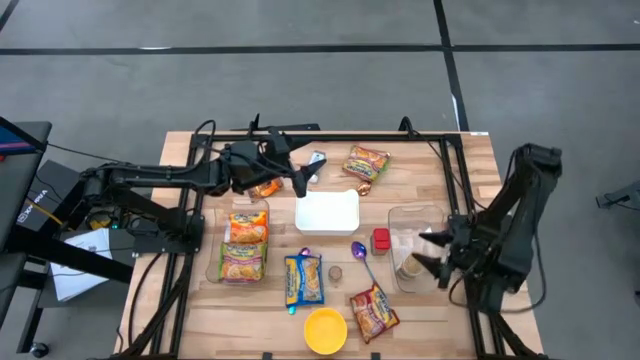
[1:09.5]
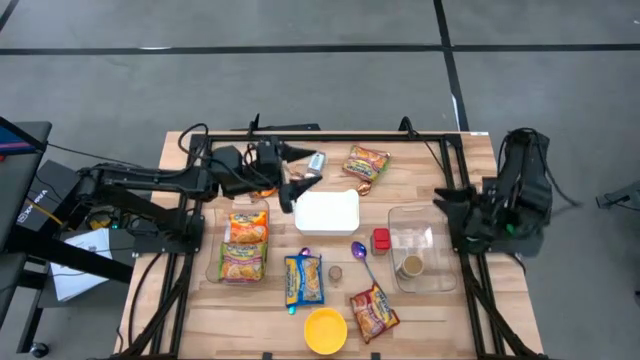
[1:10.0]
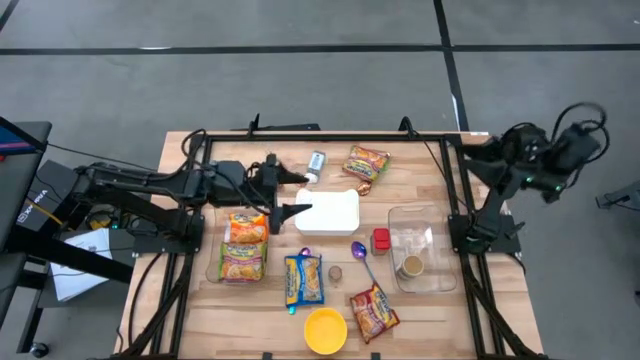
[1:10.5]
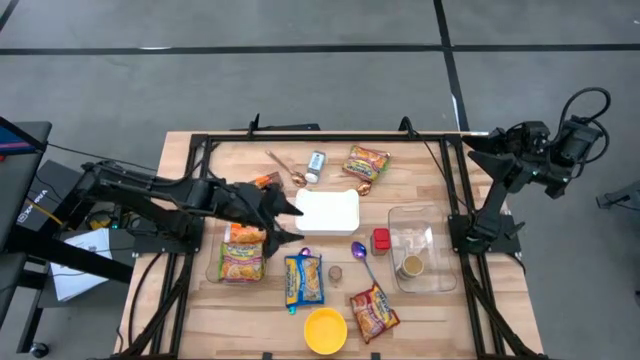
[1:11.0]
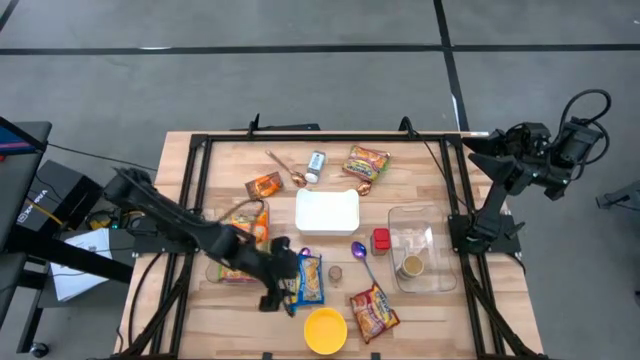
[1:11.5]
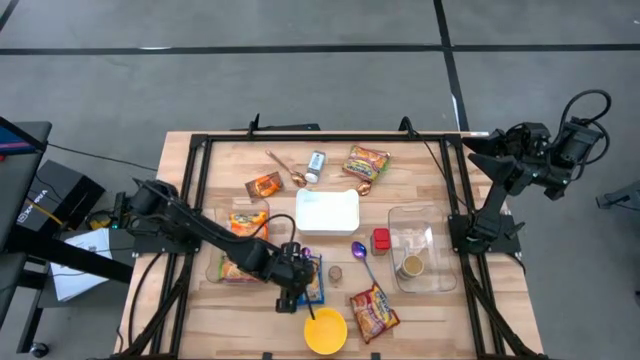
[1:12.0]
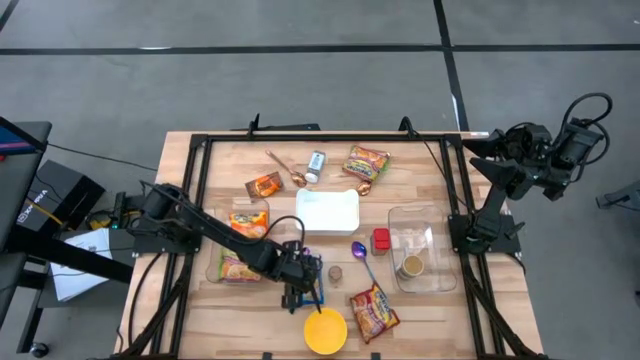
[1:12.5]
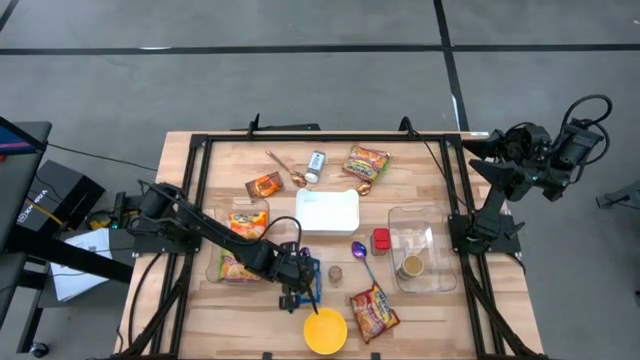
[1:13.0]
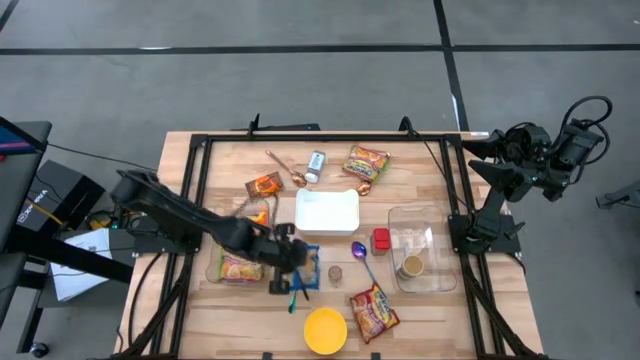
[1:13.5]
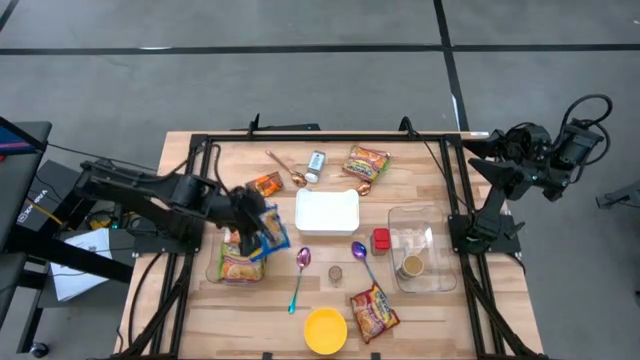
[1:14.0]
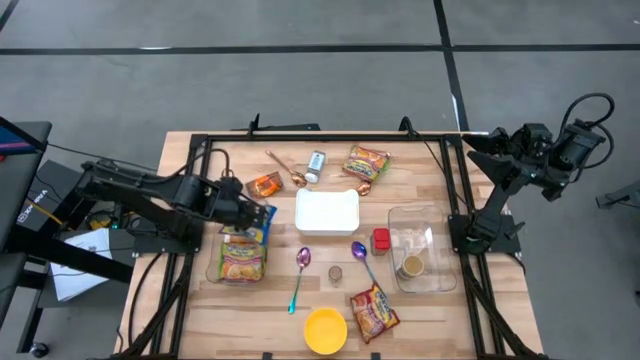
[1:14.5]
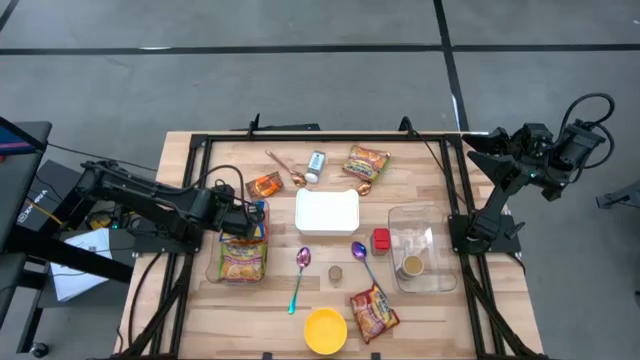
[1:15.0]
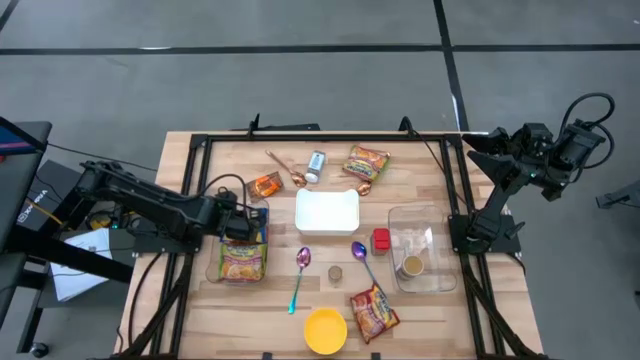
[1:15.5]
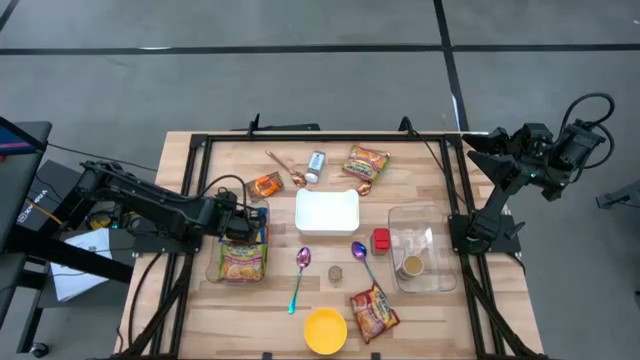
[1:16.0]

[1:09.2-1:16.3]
Task: Pick & Place Food Item
Put the blue noodle pack into the left transparent bin

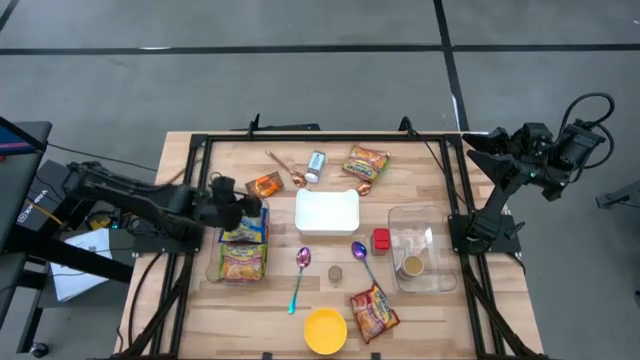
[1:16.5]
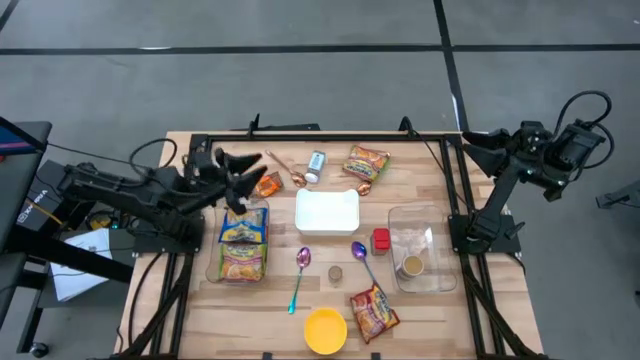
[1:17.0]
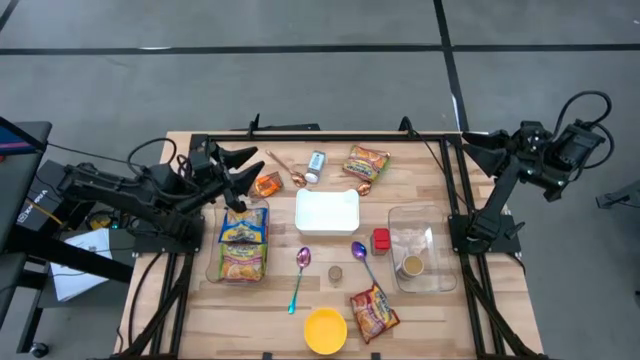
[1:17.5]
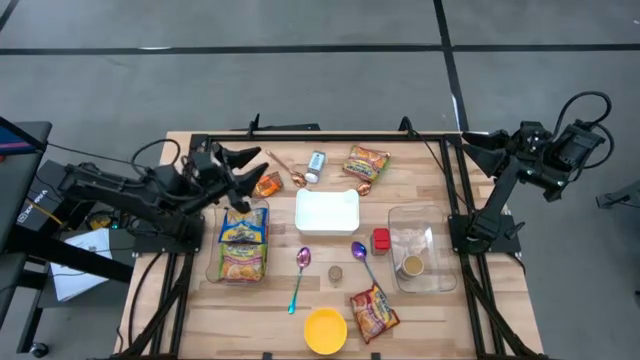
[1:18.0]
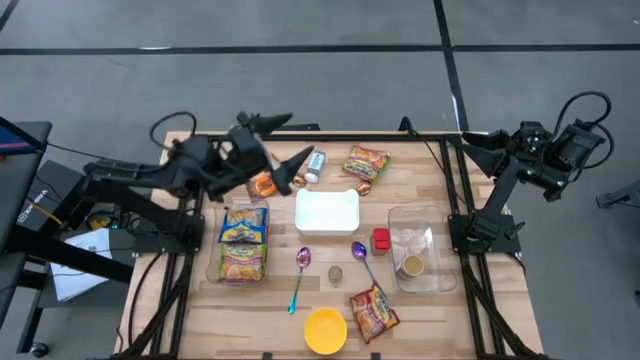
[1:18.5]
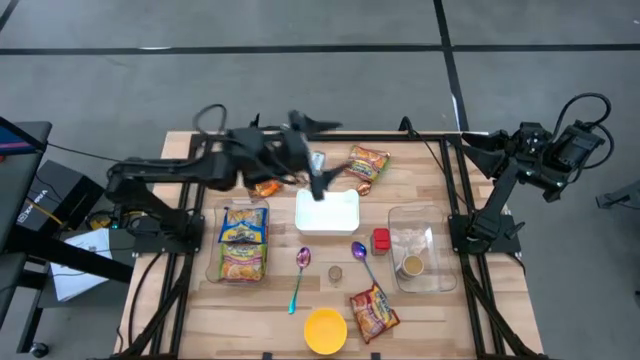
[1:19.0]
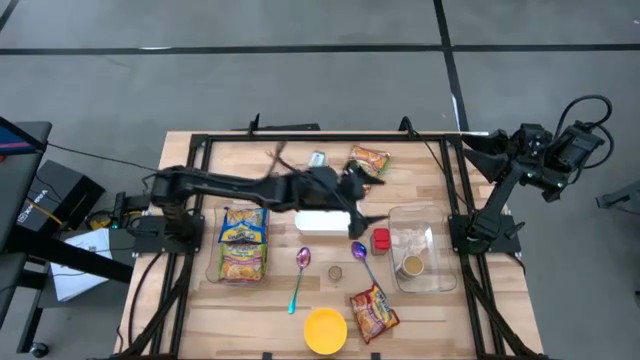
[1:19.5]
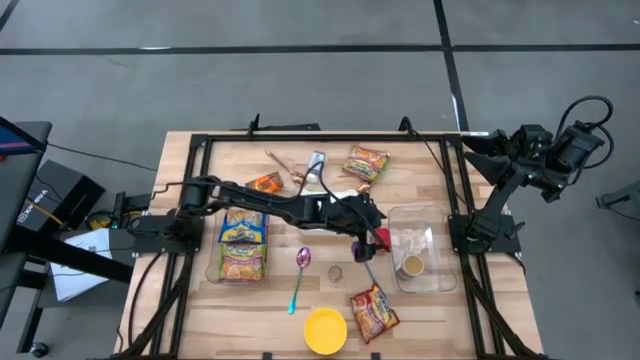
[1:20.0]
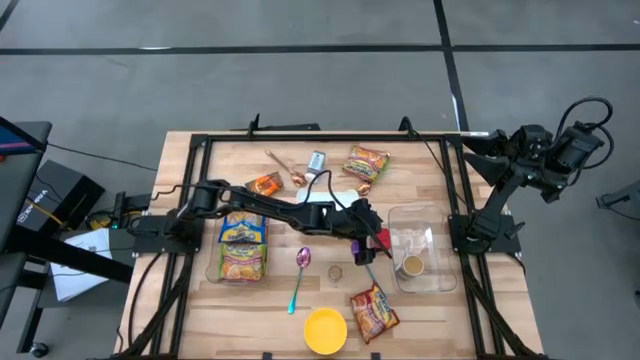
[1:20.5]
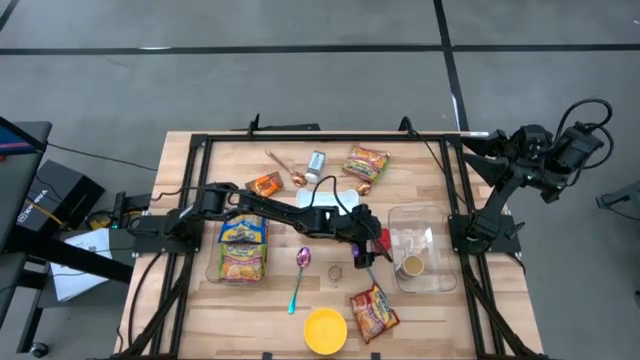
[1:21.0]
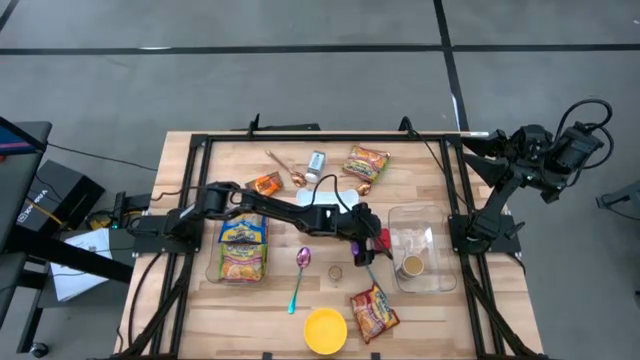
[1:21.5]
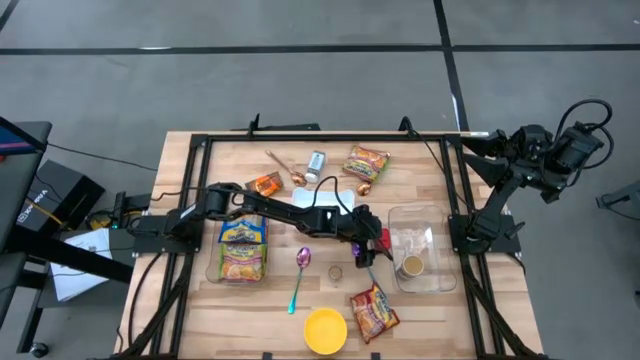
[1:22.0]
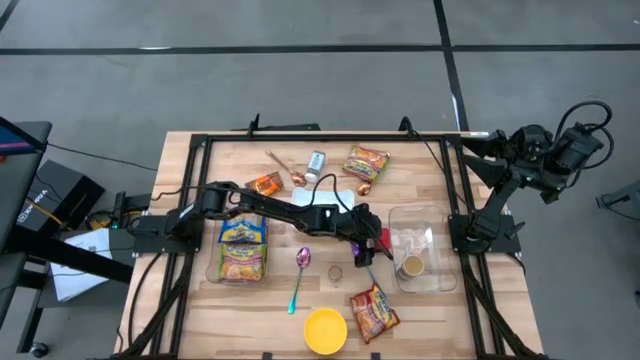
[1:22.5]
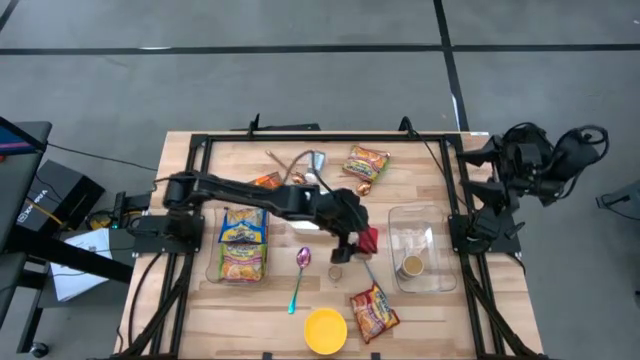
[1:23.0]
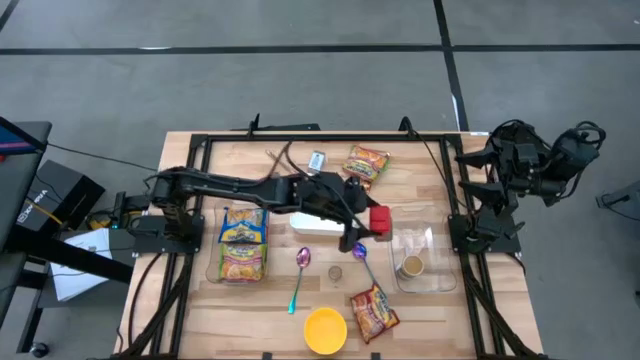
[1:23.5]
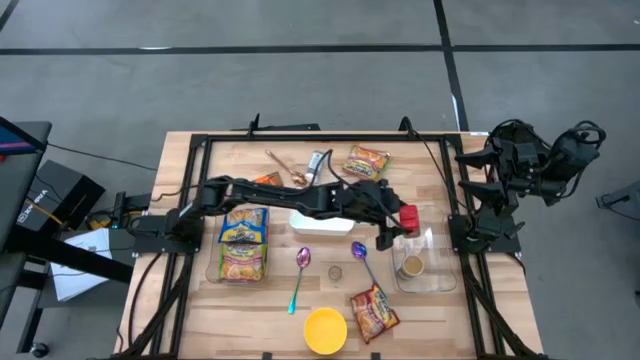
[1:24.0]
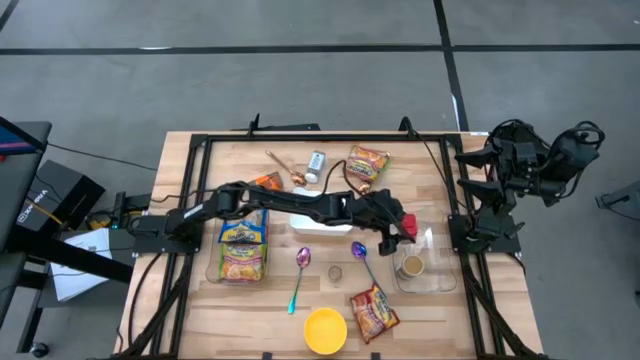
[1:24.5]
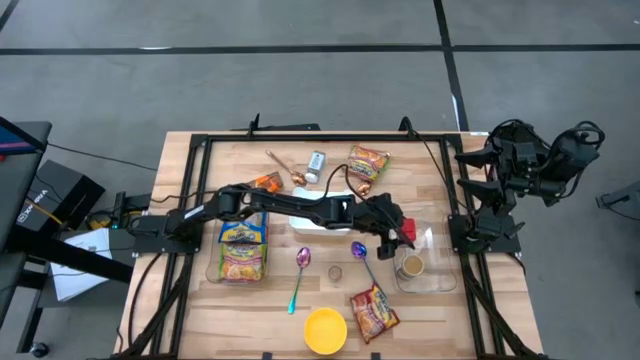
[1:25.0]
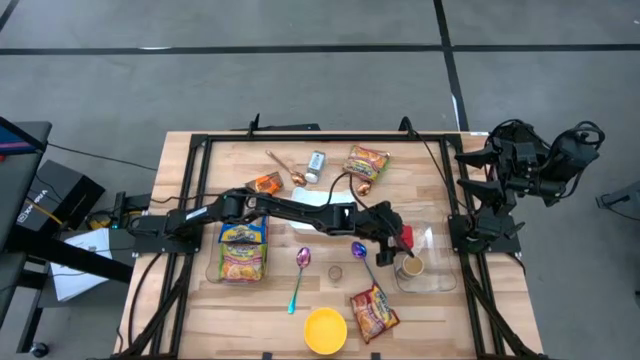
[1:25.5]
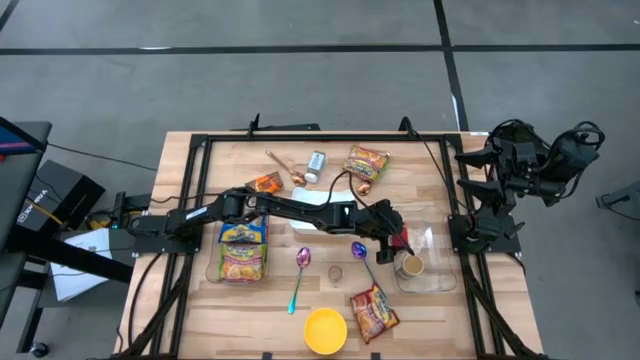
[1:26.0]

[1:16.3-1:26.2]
Put the red seasoning can into the right transparent bin

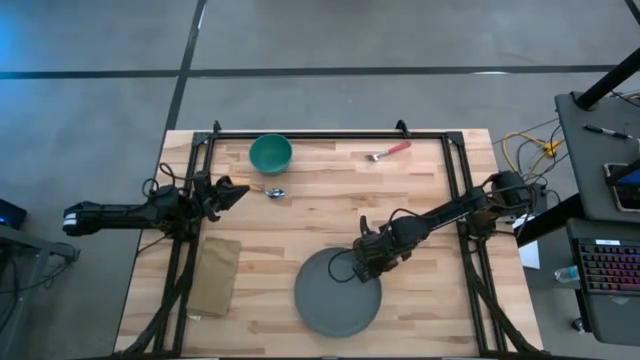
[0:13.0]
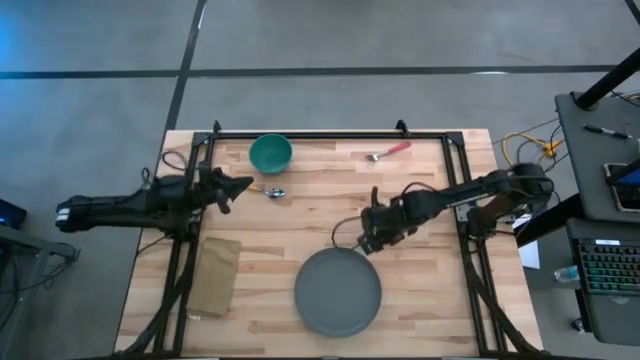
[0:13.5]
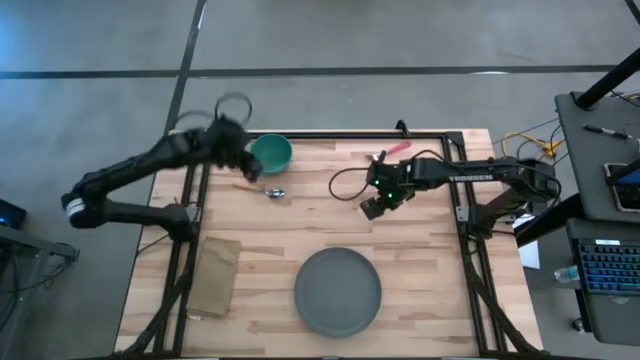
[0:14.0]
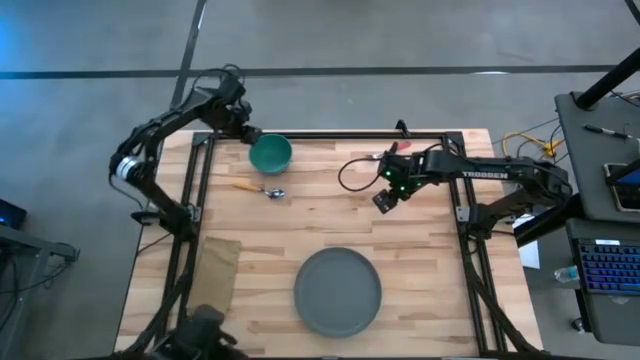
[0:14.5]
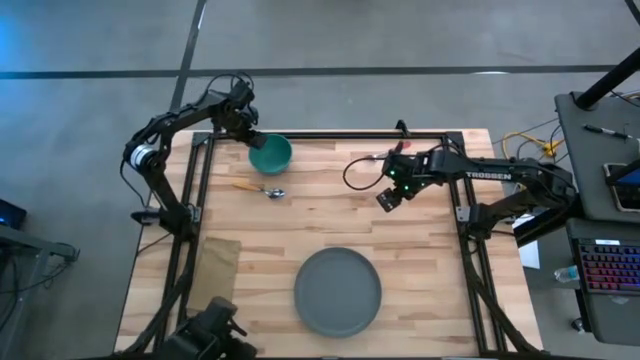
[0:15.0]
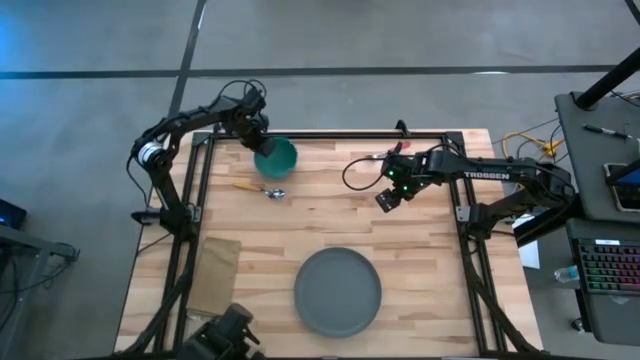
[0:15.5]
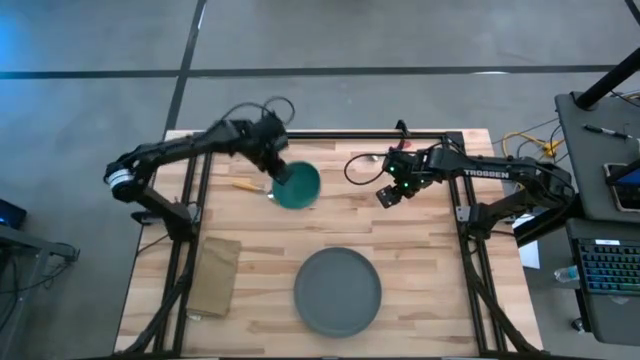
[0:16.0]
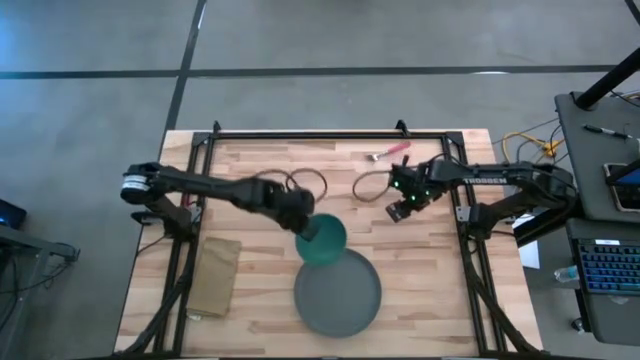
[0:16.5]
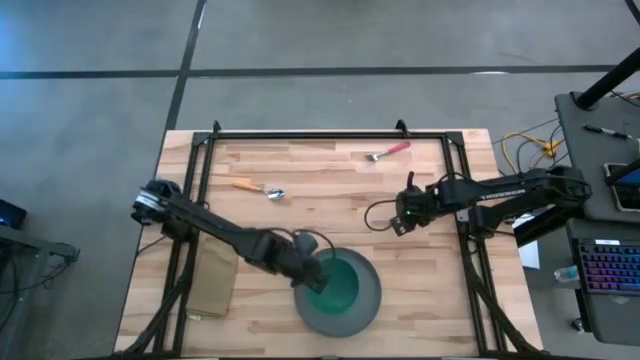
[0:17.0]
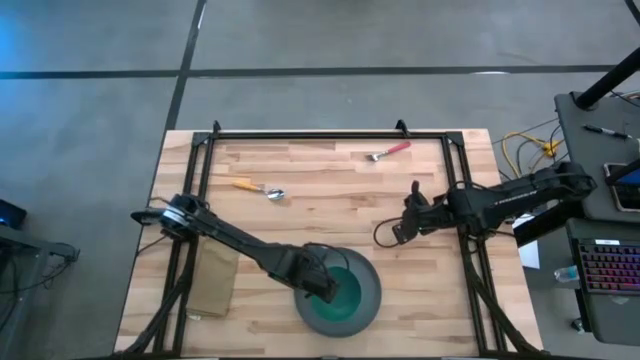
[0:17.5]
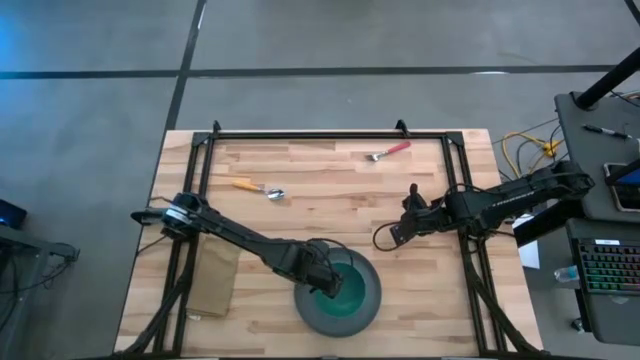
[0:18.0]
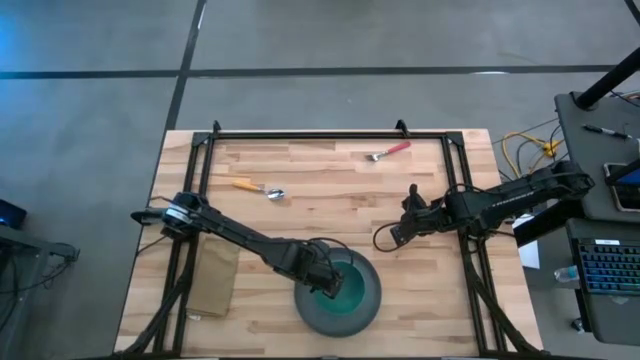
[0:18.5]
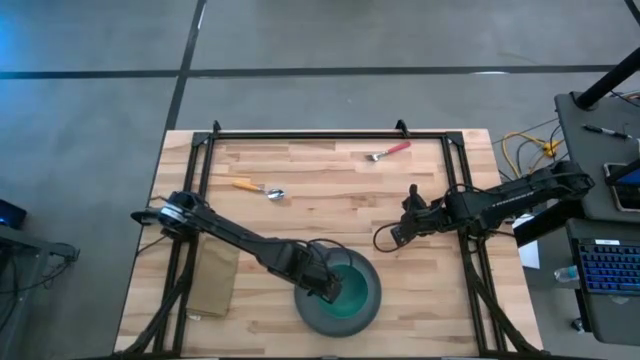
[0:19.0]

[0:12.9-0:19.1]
Task: Set table place
Put the bowl on the plate
